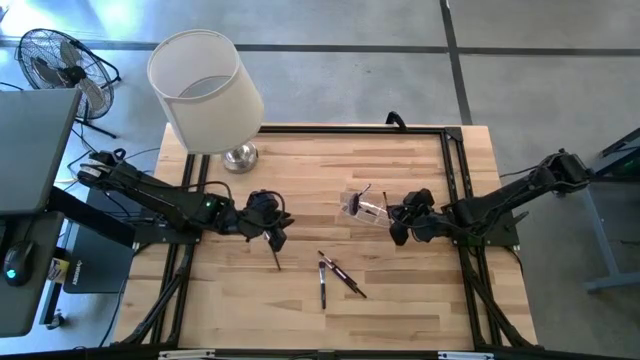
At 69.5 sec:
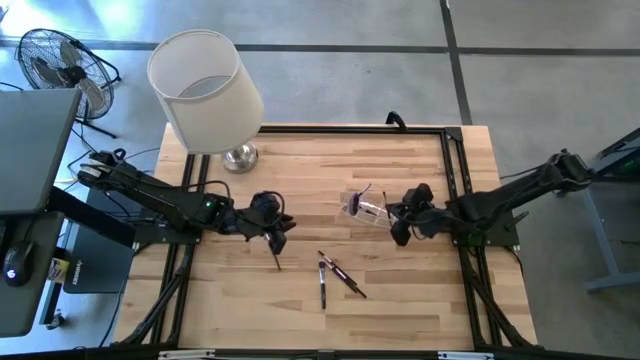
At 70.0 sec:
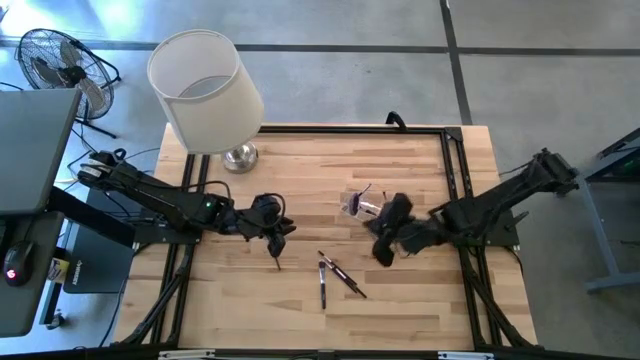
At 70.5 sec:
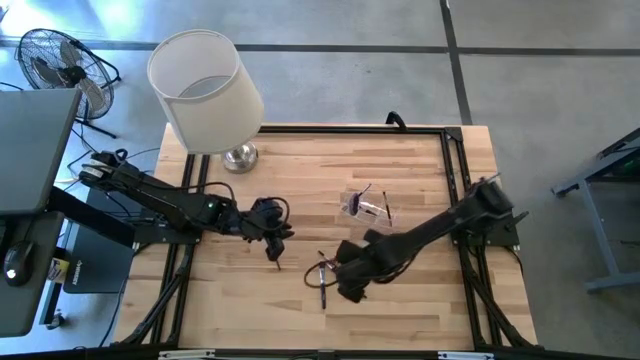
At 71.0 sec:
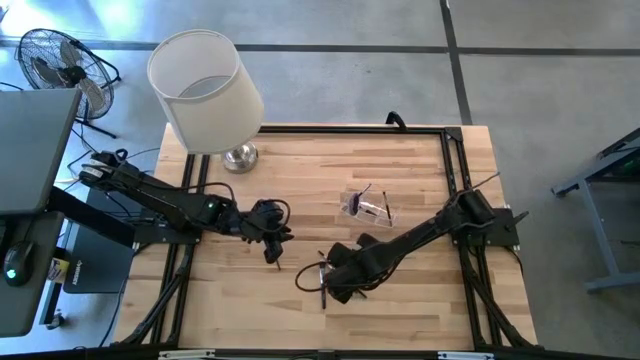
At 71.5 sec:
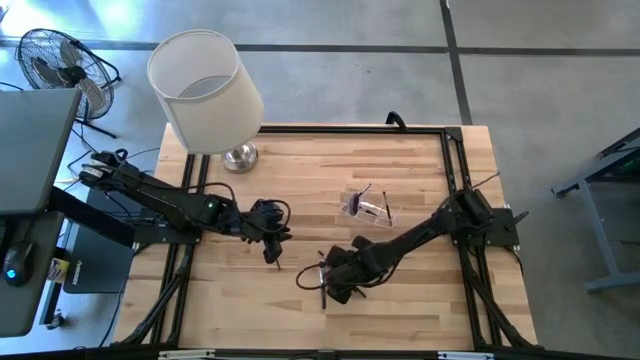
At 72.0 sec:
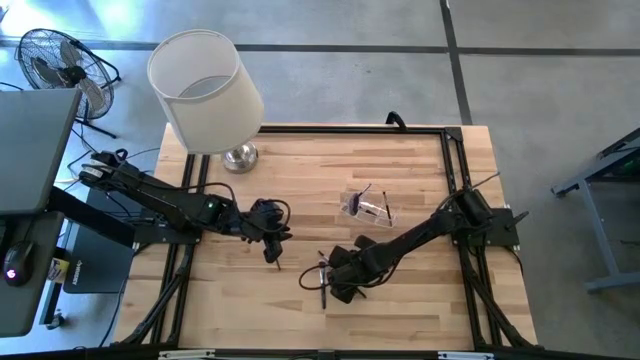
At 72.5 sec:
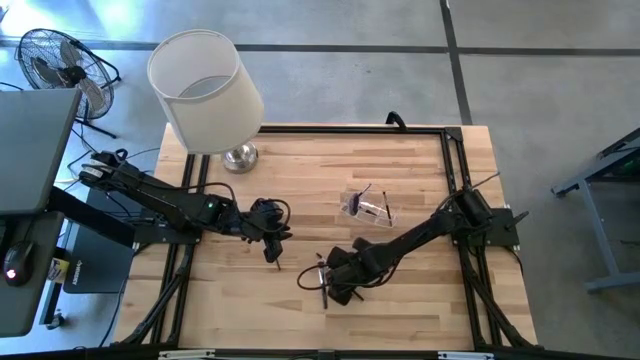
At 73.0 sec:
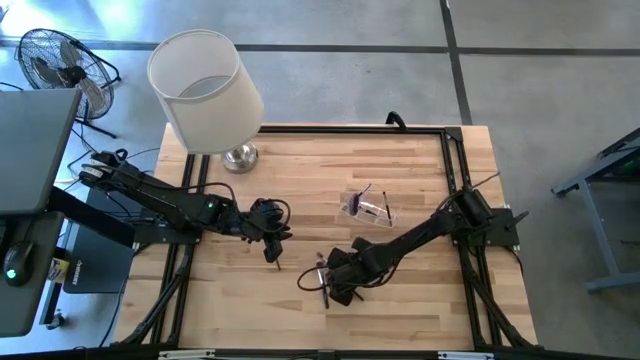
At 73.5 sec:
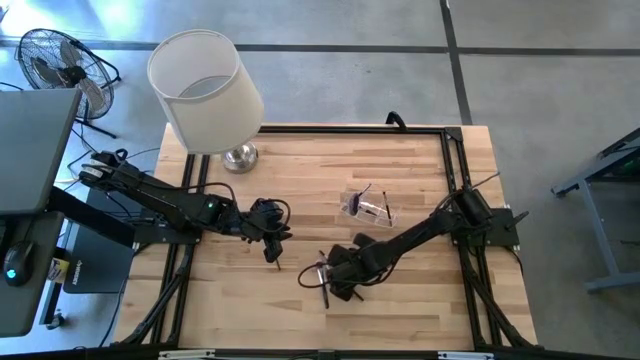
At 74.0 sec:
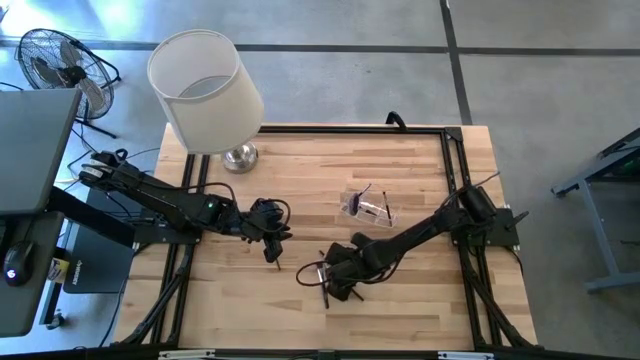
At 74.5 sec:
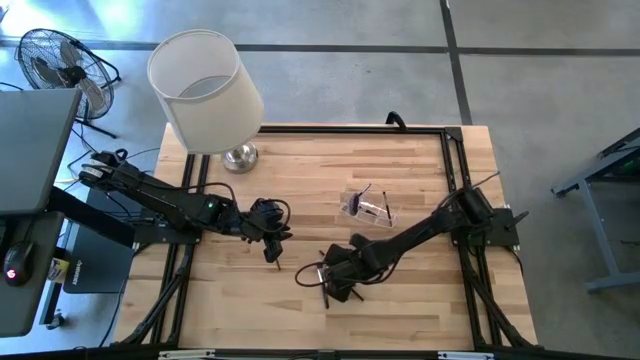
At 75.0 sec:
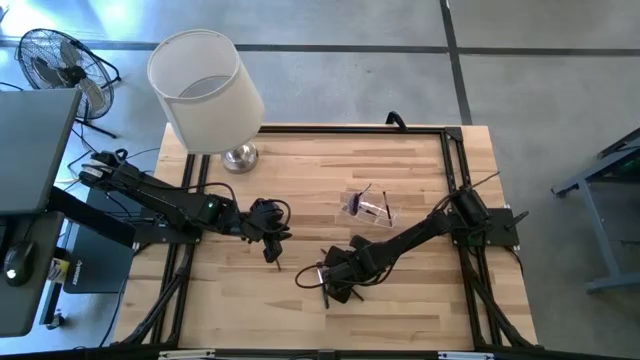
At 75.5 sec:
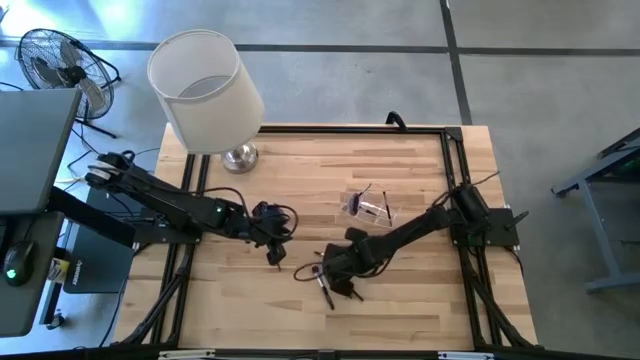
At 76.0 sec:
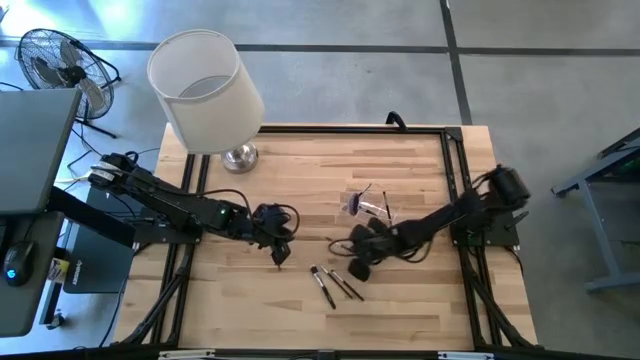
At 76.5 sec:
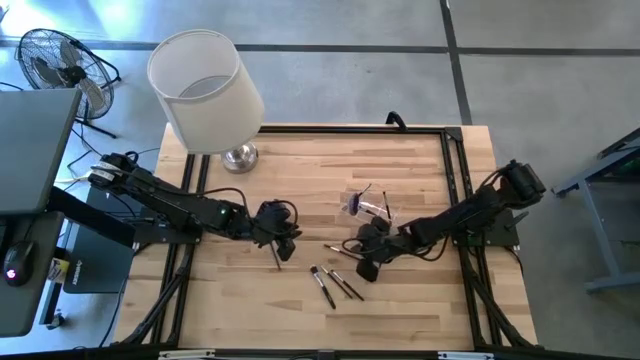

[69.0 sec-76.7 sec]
Task: Put items in baskets/containers
Put the black lash brush into the transparent organizer
